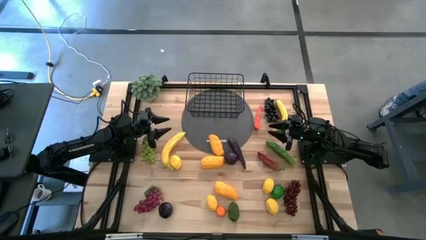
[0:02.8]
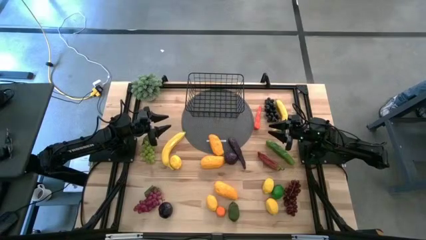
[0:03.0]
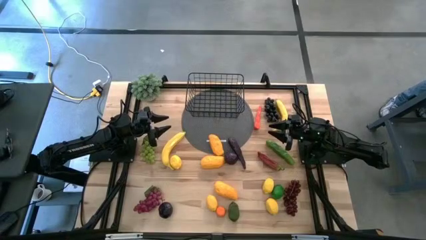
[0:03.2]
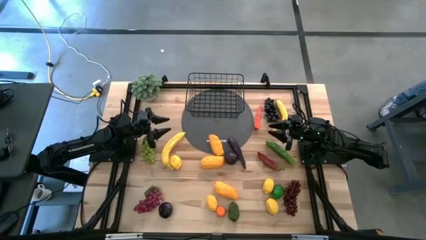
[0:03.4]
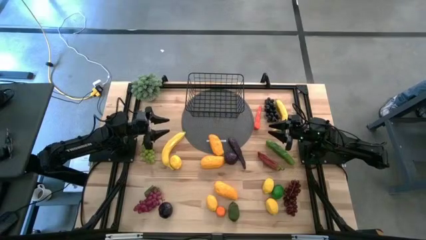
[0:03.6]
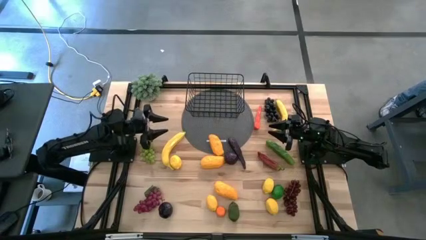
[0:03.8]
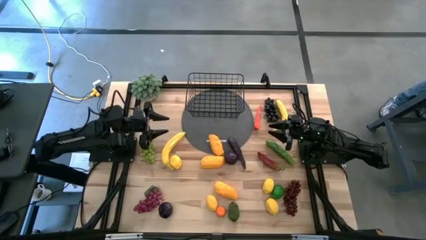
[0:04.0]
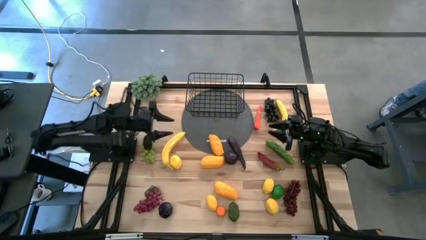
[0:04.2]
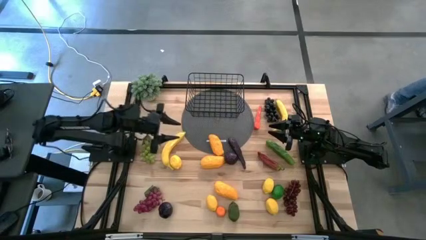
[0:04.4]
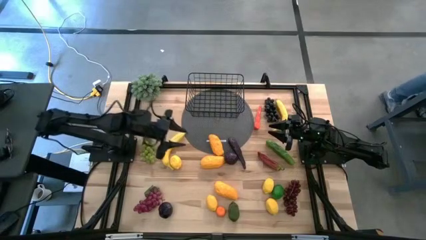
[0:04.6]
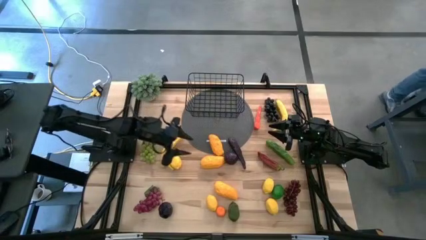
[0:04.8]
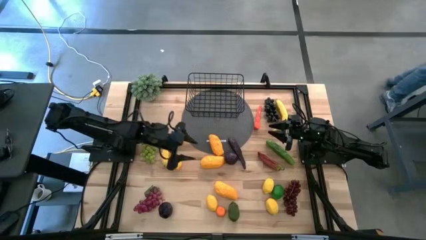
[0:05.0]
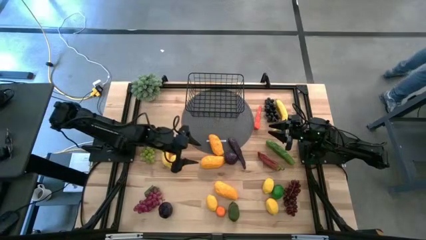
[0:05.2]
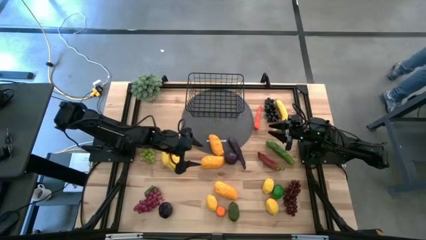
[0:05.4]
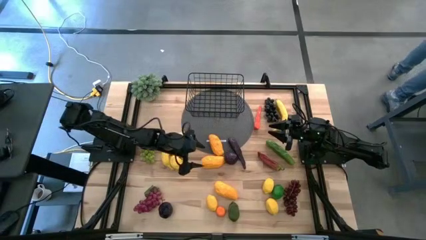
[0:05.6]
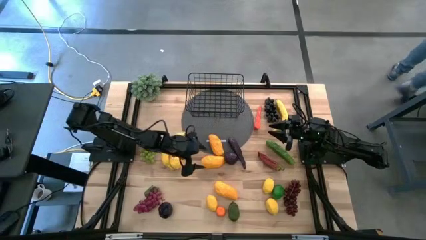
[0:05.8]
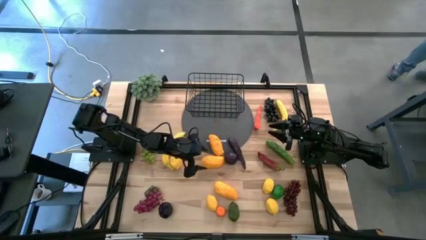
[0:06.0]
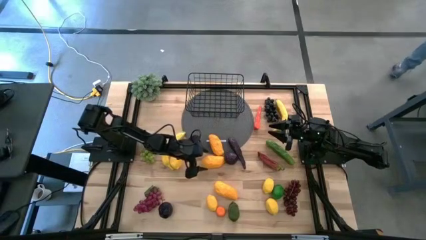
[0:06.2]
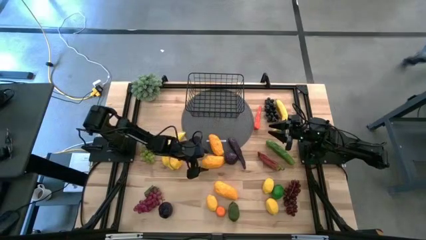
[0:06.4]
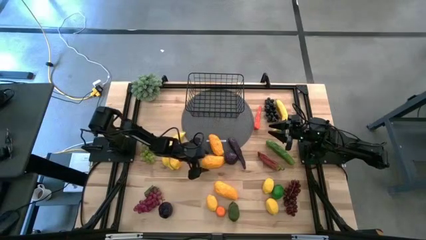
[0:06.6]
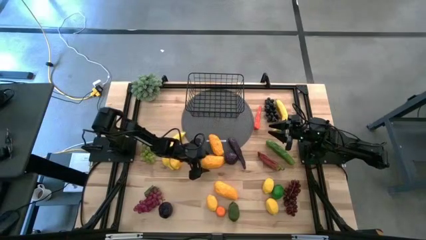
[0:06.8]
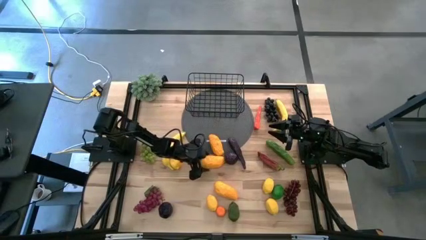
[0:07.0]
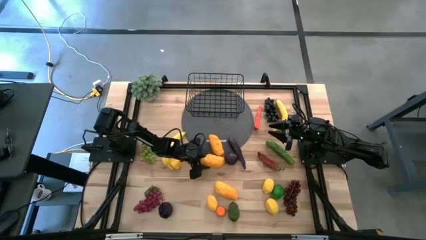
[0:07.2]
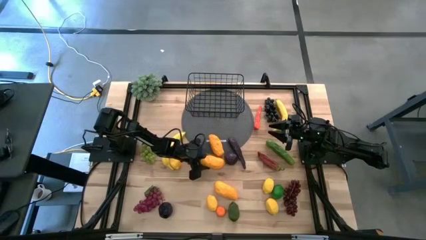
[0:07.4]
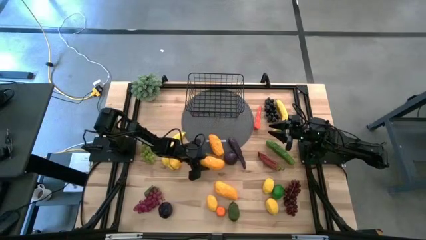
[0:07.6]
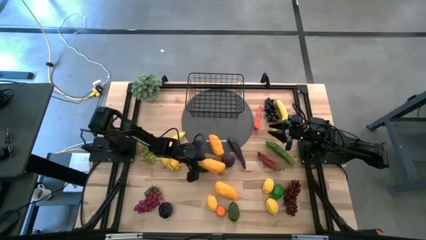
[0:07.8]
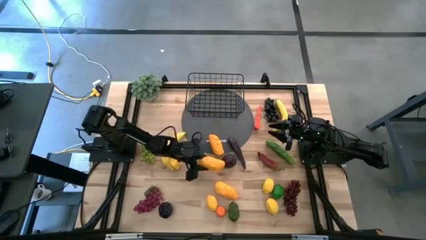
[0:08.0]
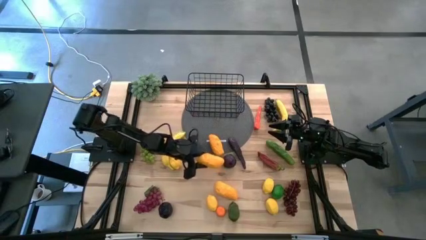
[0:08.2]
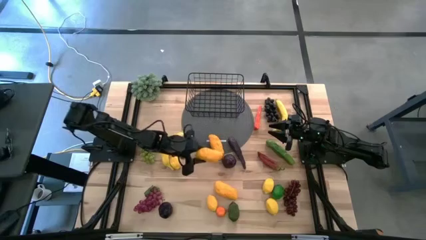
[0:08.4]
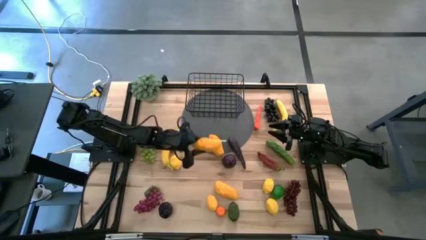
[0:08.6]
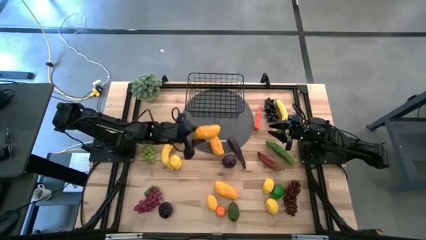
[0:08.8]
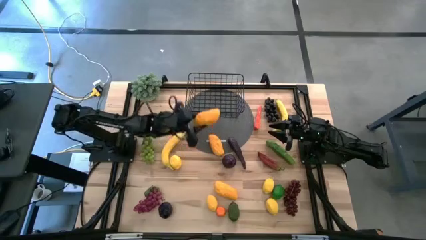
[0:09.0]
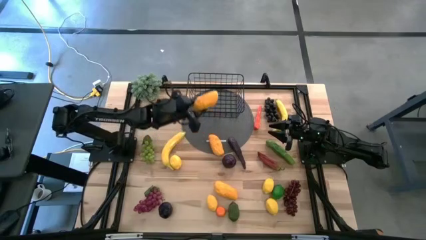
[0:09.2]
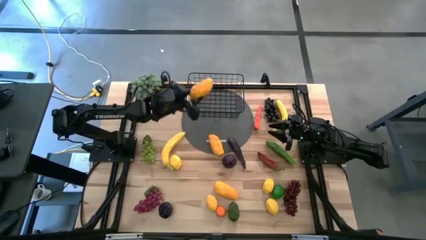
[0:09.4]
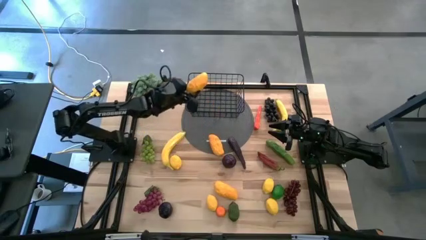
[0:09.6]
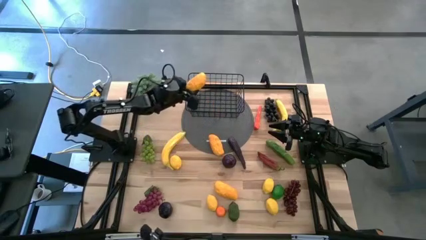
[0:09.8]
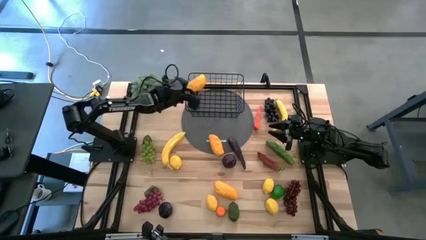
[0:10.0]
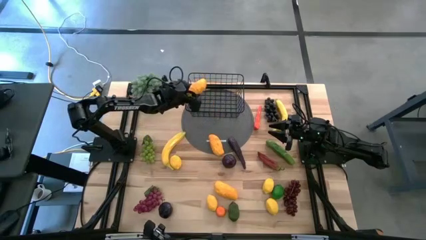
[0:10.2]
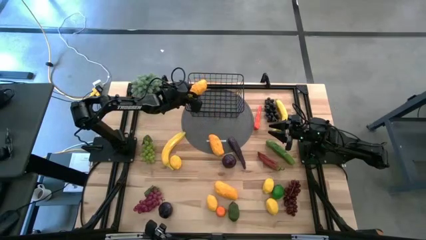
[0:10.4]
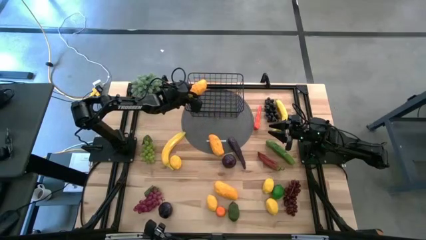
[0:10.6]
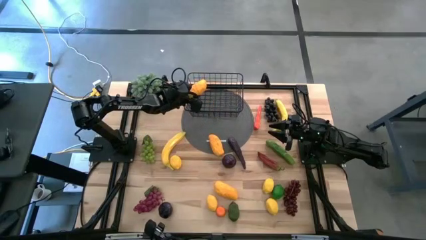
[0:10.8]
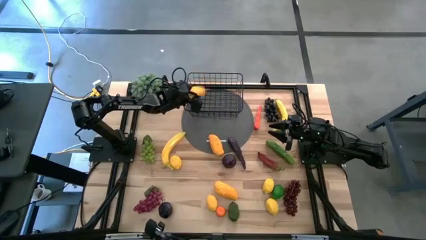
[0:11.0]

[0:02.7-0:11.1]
Task: Build produce basket
Put the mango into the black wire basket

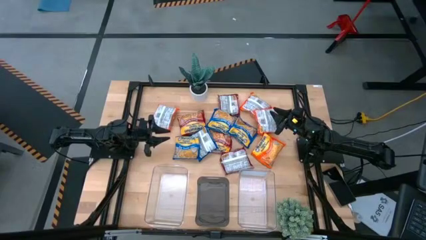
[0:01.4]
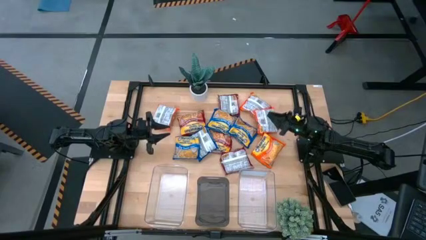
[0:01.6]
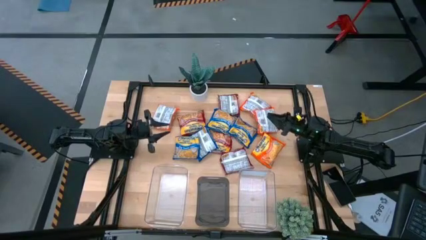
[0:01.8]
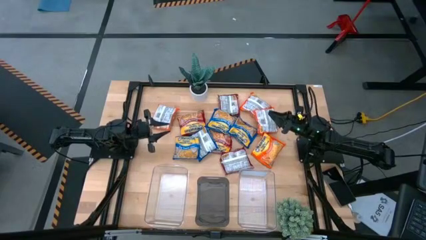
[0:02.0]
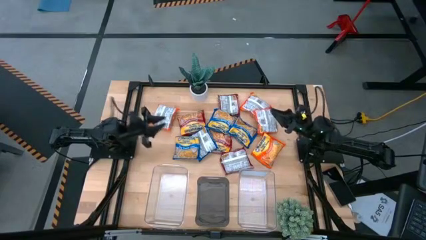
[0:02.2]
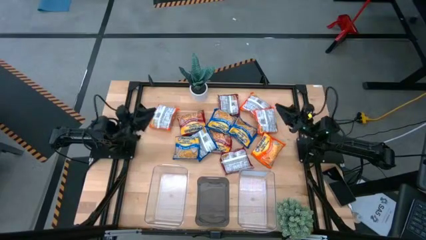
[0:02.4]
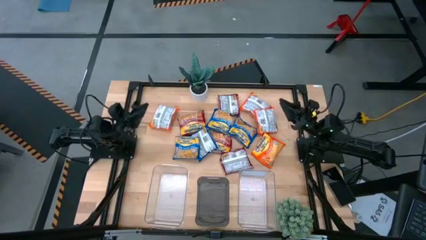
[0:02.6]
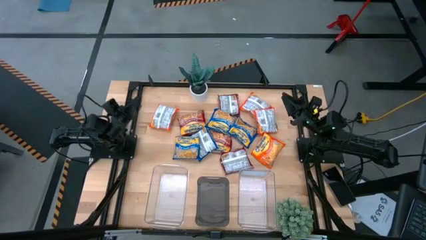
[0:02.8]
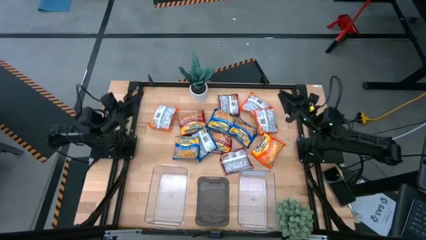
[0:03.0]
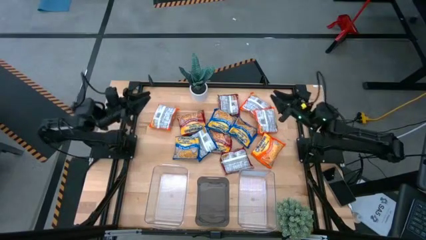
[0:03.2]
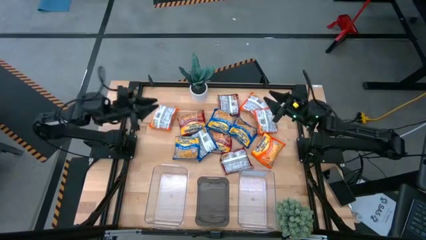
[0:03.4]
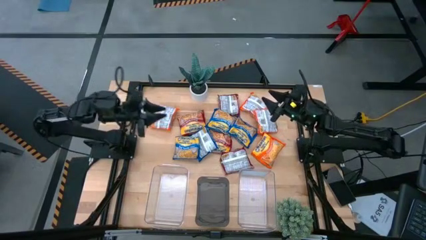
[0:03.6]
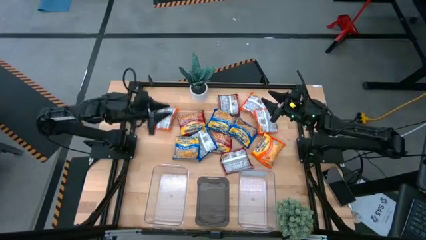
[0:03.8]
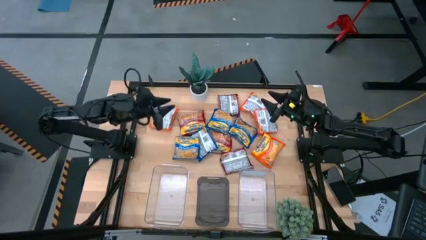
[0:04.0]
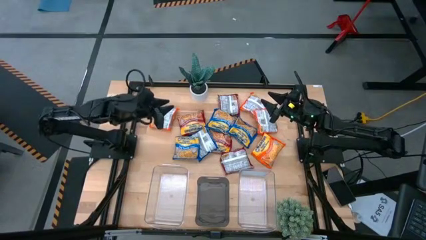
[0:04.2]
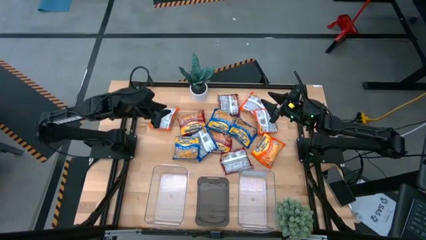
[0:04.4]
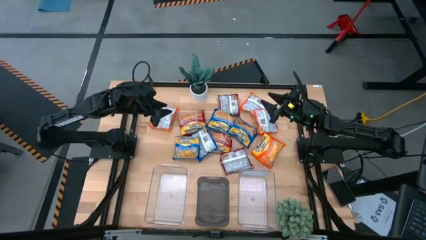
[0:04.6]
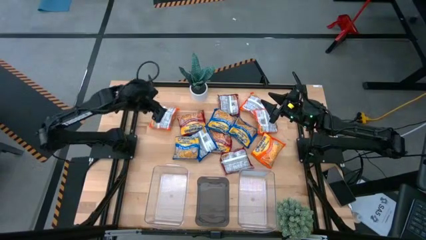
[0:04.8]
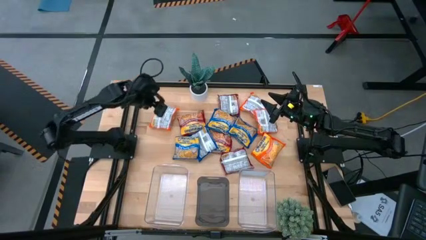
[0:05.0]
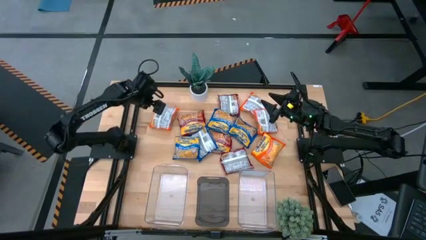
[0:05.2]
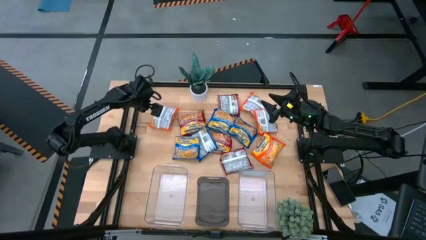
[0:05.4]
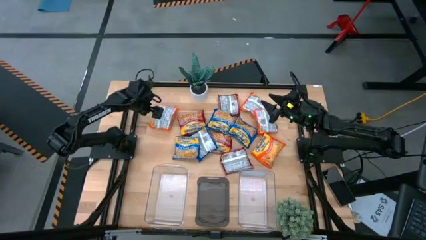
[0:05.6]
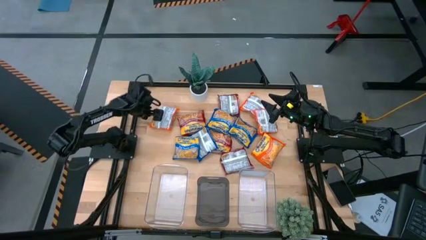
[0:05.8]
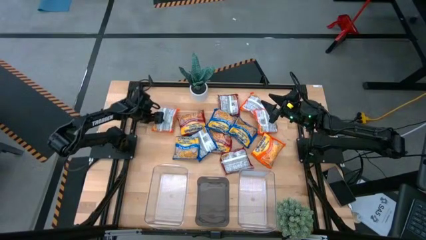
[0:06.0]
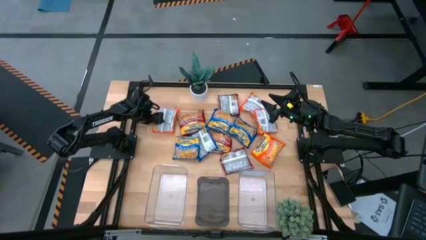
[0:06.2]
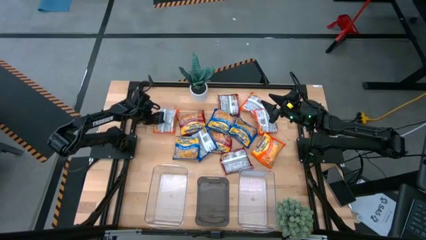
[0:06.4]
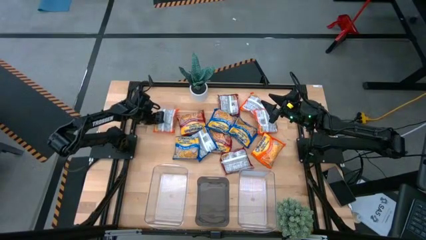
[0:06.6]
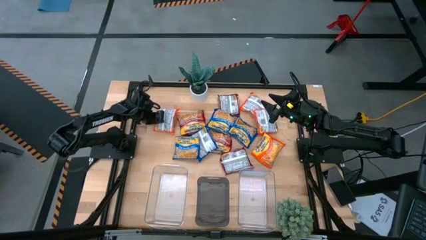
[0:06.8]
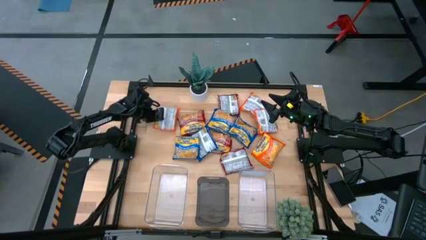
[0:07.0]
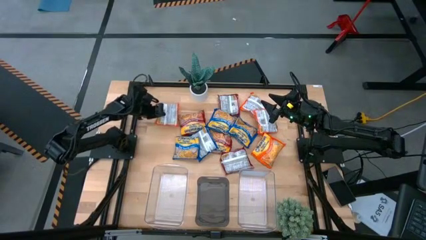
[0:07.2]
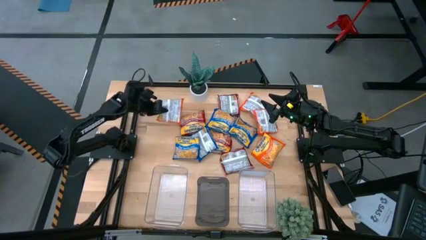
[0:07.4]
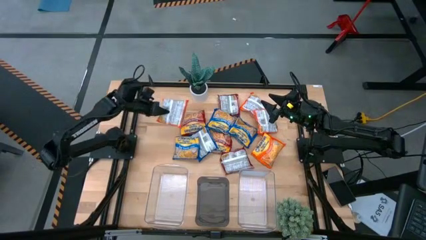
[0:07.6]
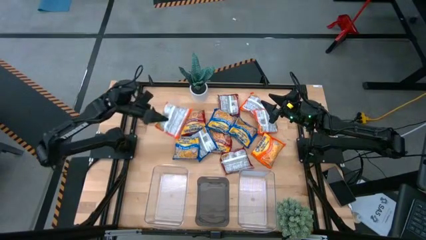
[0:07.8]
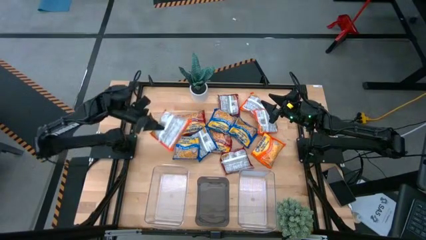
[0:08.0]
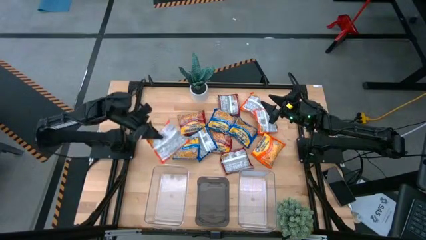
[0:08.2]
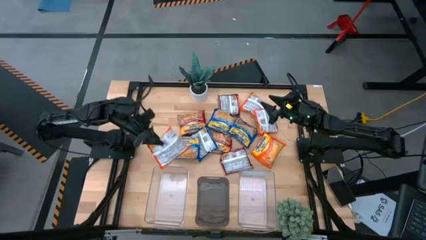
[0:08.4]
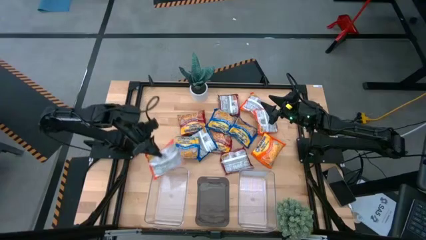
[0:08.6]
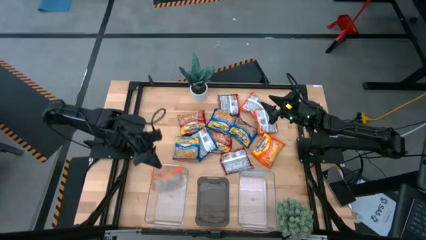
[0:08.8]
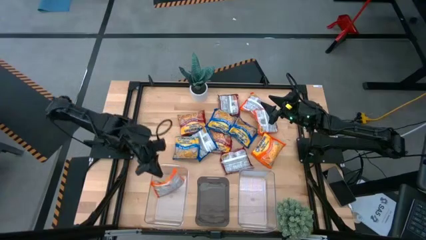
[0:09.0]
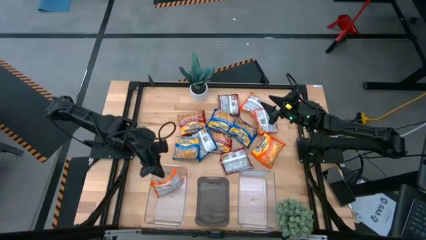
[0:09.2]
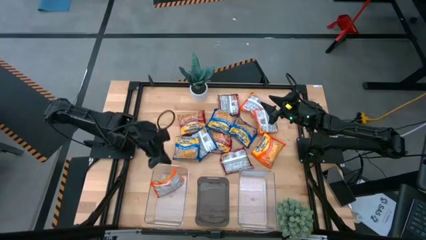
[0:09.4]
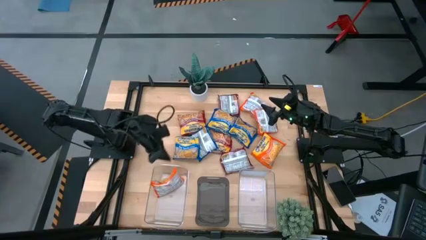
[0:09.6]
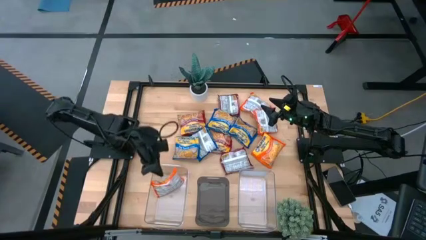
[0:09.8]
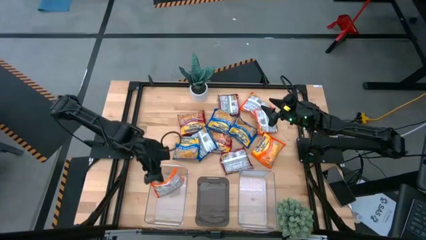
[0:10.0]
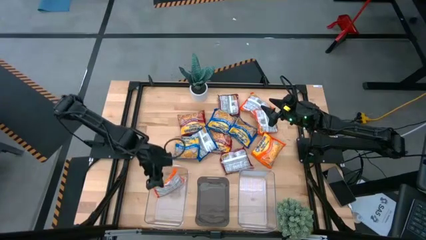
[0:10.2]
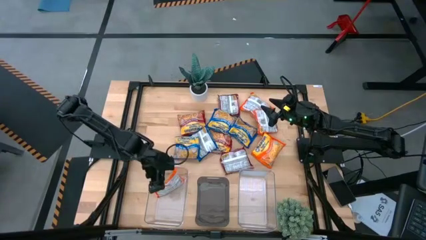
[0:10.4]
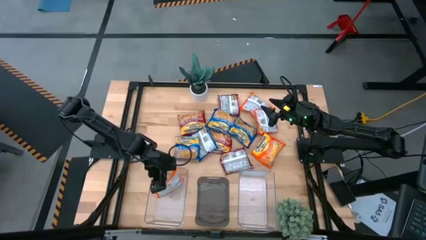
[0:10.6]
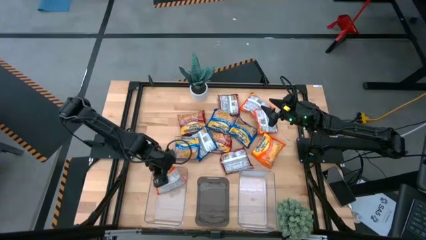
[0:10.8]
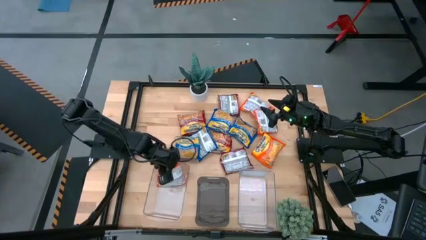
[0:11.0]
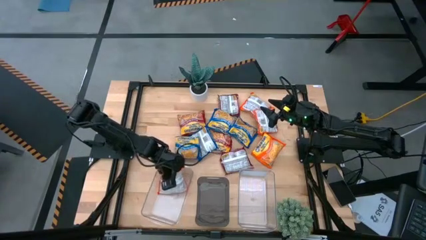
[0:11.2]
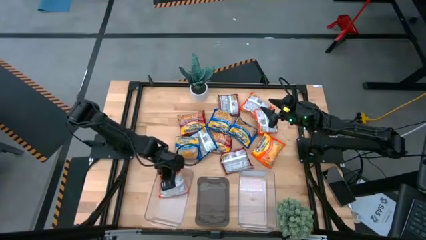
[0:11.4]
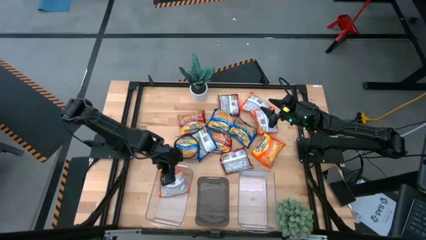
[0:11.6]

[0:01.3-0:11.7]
Task: Sort Maruchan noodles
Put the orange noodle pack into the left transparent bin
